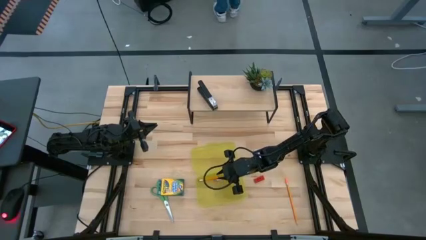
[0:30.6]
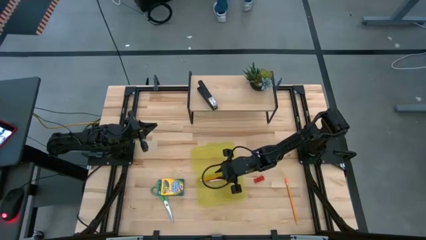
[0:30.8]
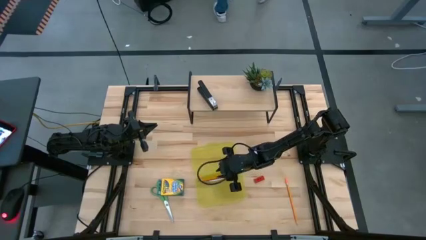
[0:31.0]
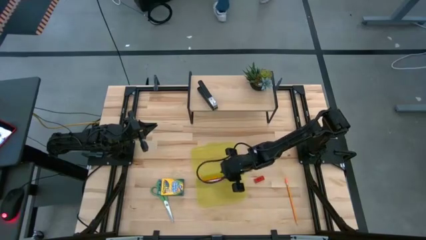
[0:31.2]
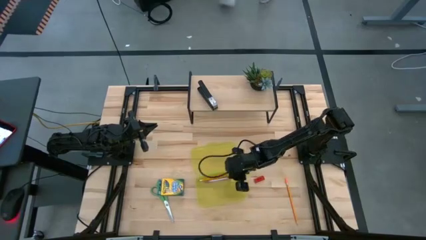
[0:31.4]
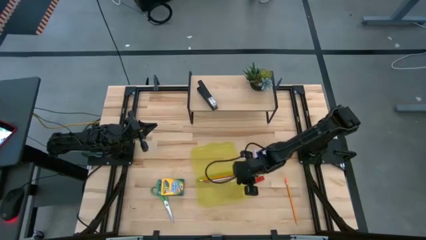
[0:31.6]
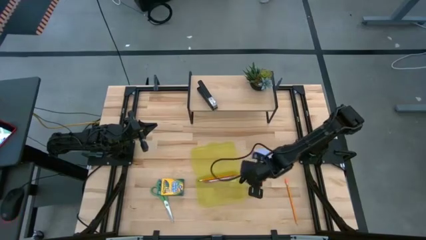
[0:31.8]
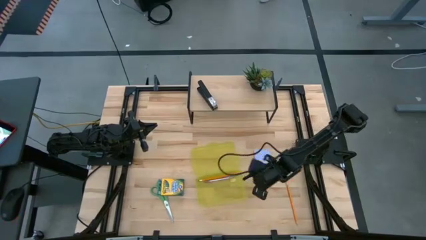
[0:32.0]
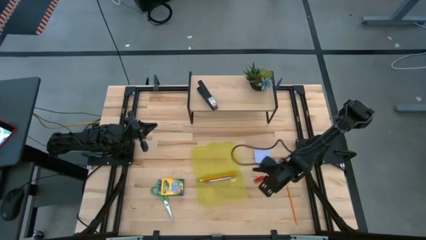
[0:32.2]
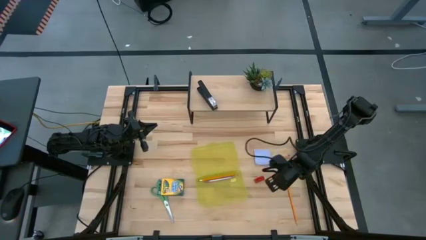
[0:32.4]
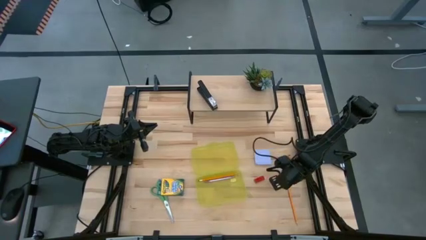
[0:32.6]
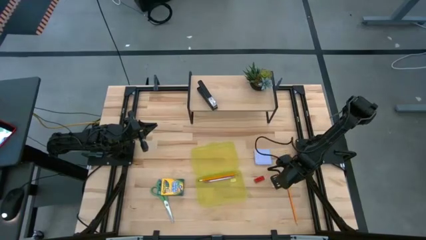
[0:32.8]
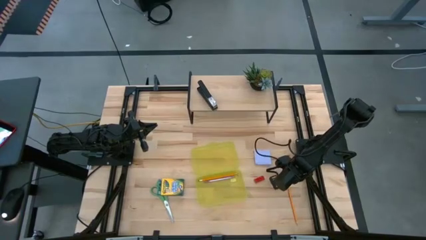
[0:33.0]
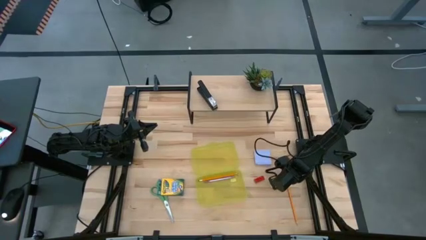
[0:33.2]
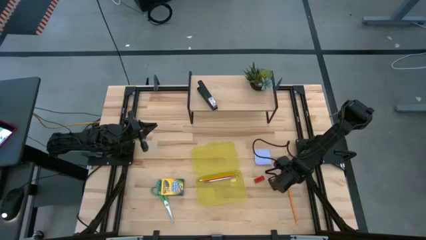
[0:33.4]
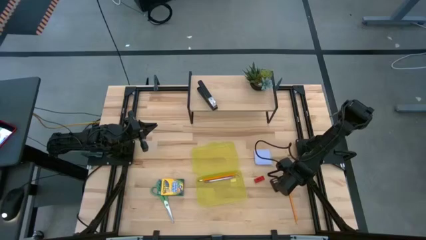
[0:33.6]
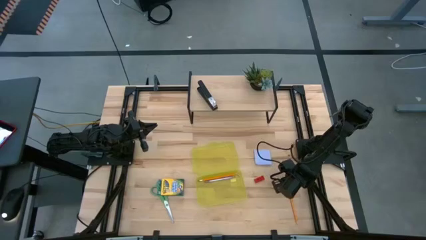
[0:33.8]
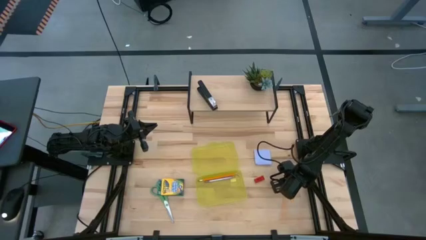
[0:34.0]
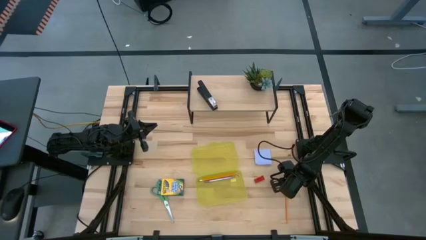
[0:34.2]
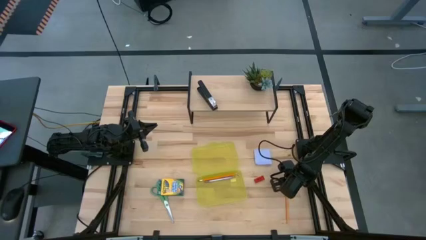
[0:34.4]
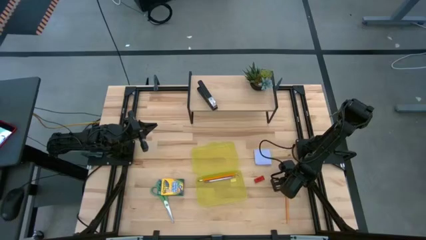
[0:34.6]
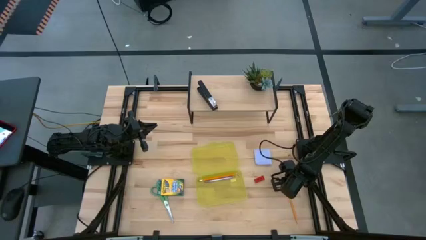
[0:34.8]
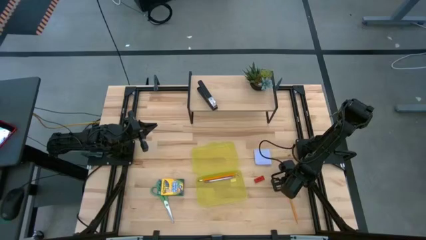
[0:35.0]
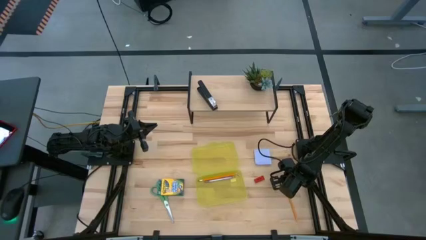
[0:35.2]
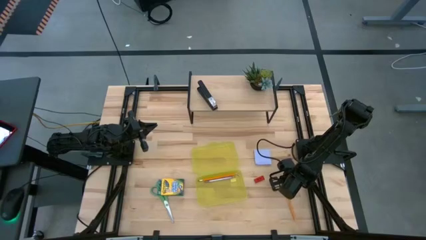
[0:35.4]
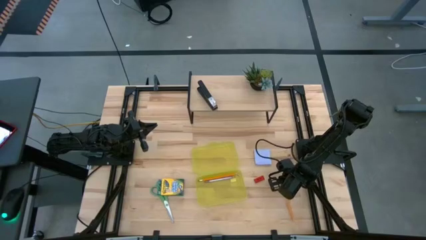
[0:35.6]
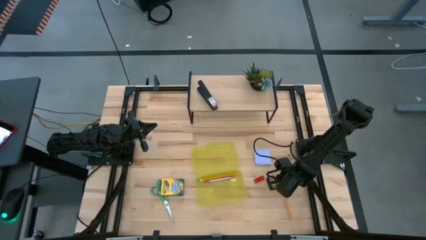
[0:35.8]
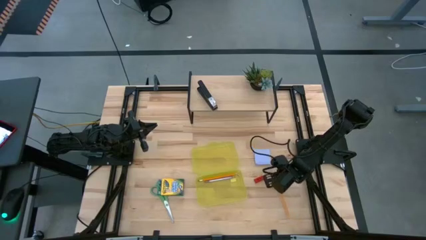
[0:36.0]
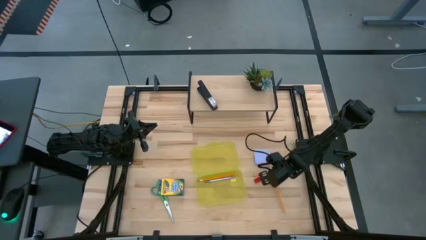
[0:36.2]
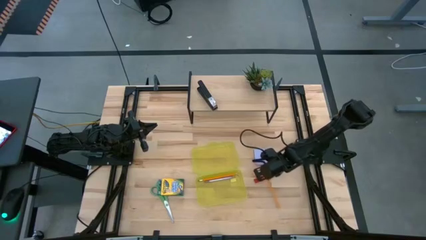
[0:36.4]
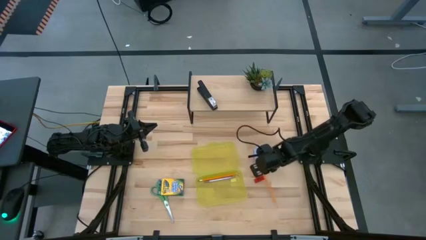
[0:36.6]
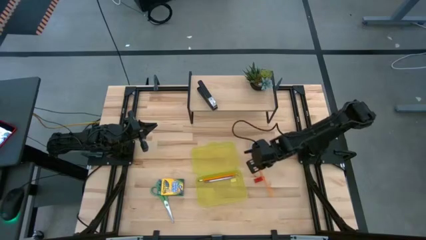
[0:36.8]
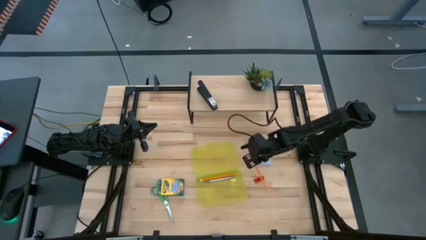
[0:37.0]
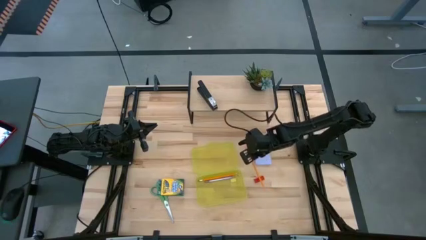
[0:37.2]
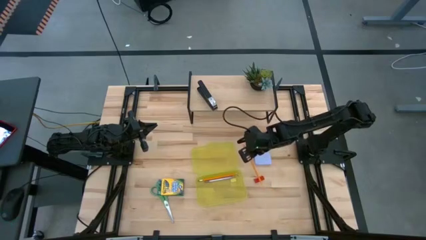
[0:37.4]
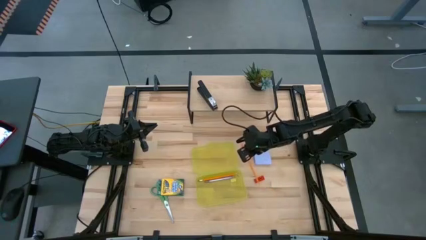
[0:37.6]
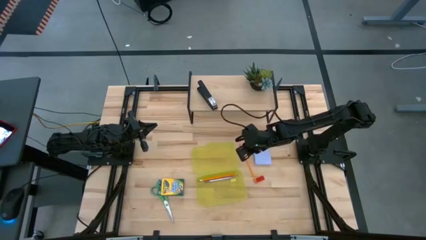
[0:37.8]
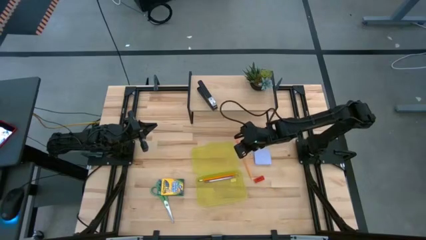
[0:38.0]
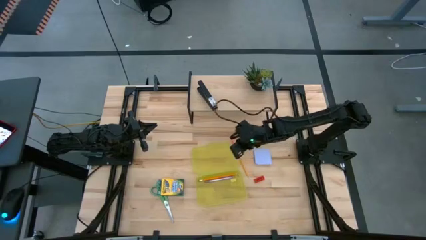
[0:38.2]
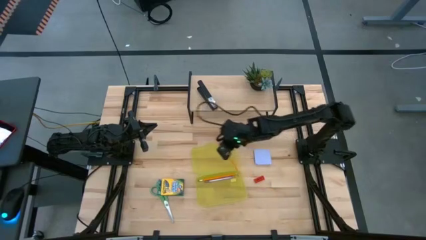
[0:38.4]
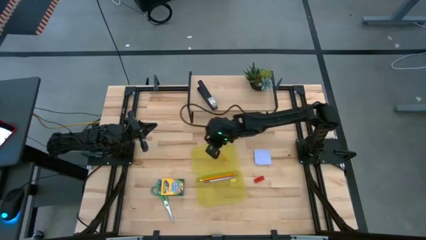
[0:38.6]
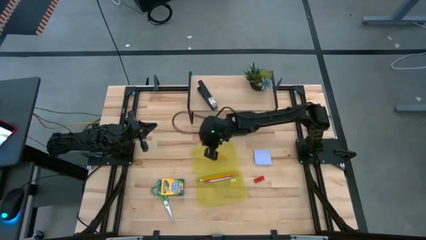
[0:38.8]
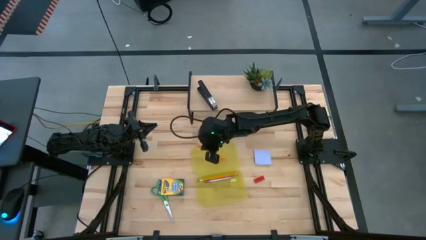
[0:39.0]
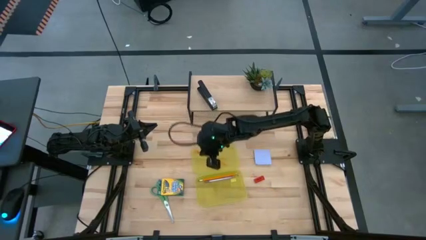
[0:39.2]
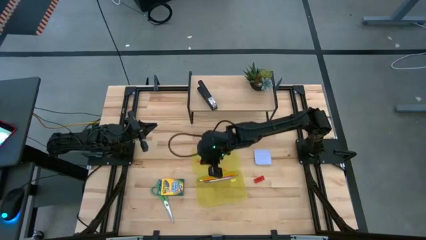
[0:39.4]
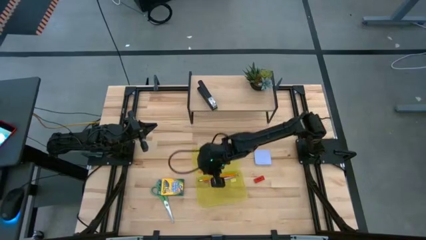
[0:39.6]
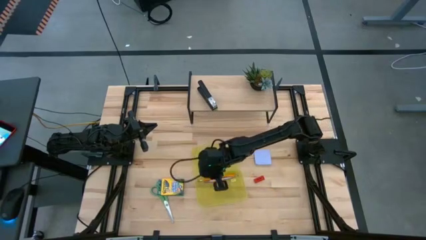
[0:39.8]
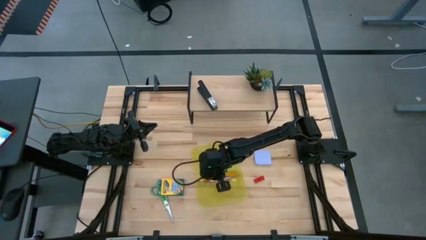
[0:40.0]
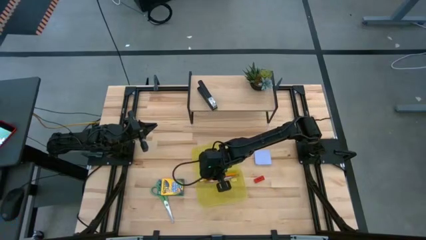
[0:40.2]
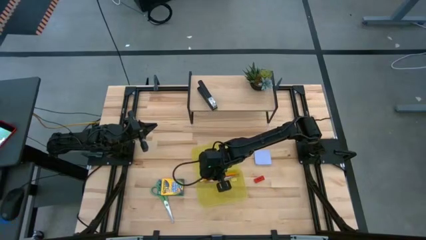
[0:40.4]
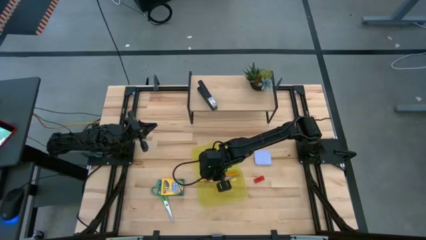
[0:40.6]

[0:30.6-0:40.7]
Task: Pack school essentials
Put the yellow pencil into the yellow supply box
